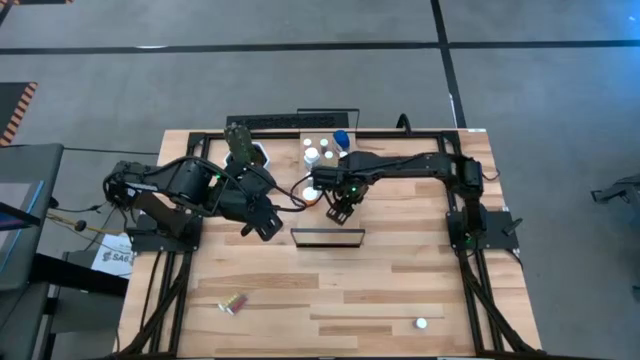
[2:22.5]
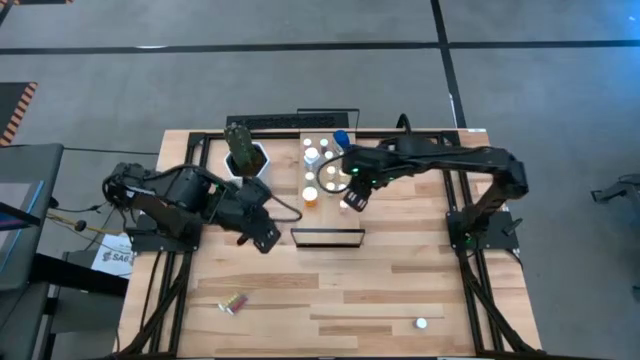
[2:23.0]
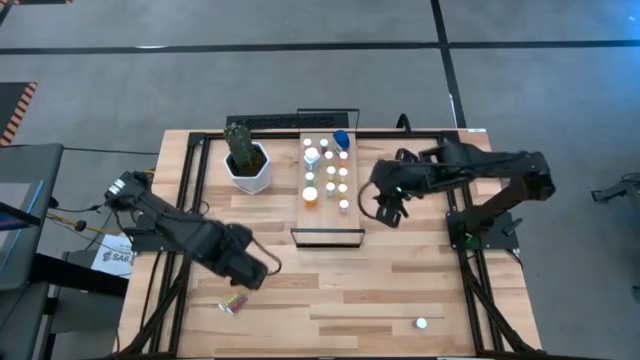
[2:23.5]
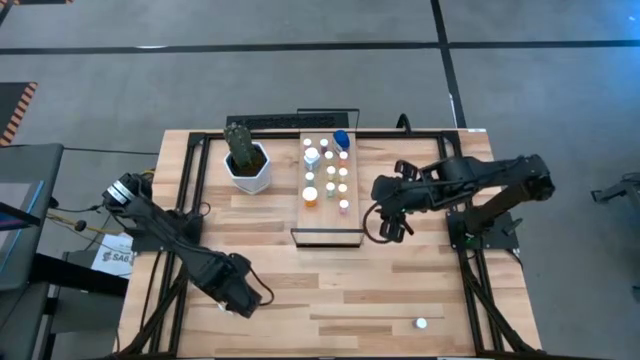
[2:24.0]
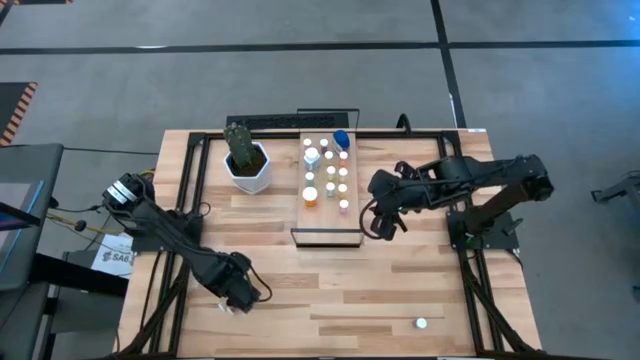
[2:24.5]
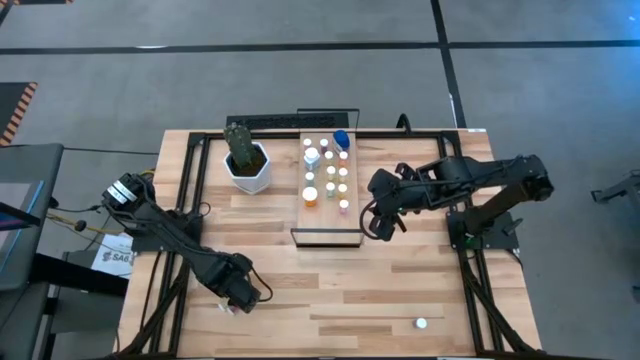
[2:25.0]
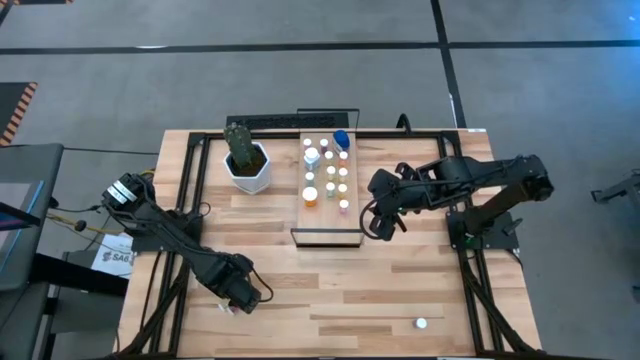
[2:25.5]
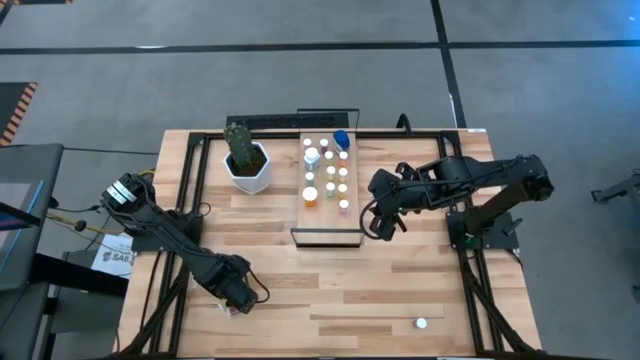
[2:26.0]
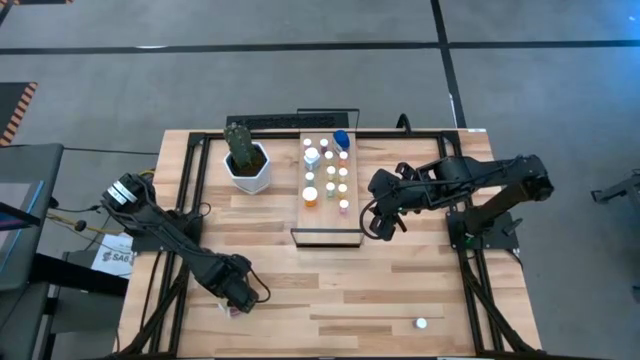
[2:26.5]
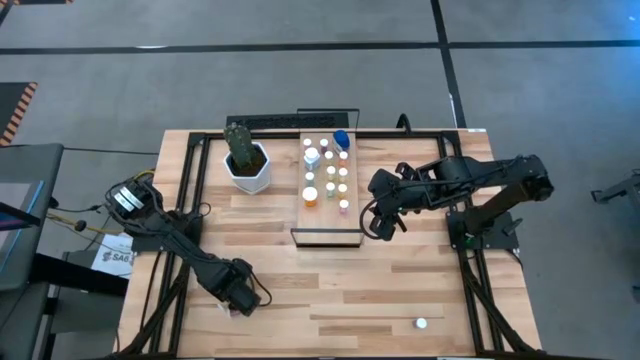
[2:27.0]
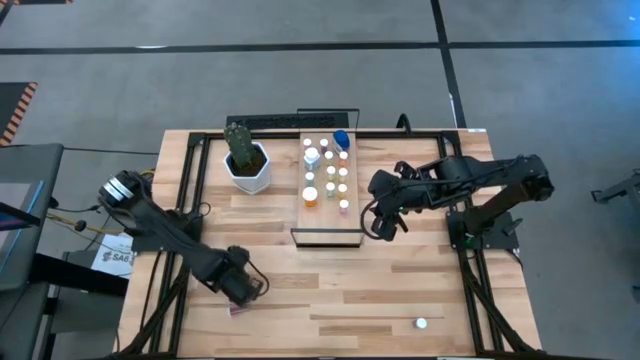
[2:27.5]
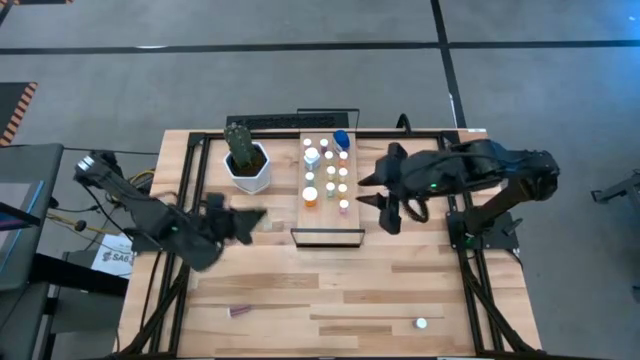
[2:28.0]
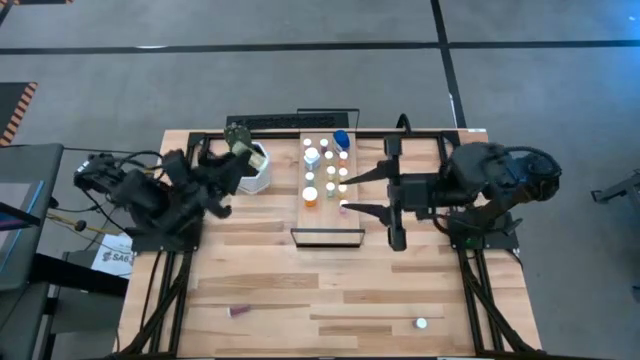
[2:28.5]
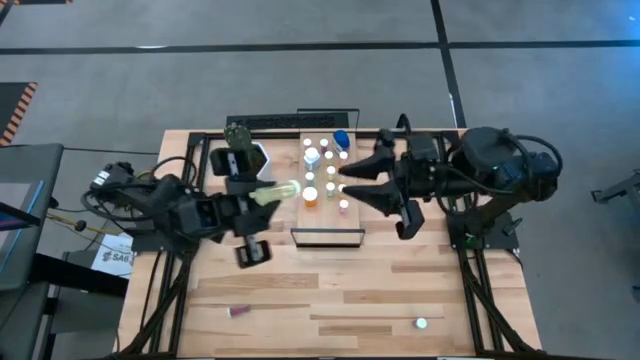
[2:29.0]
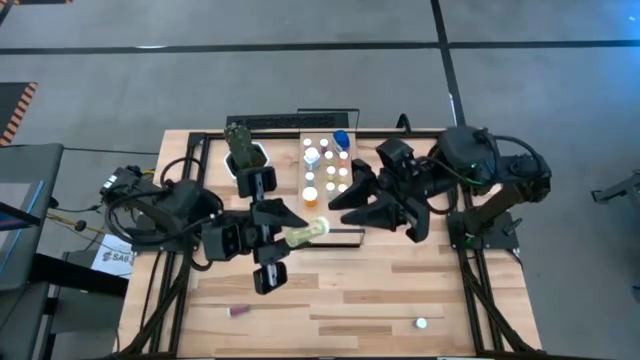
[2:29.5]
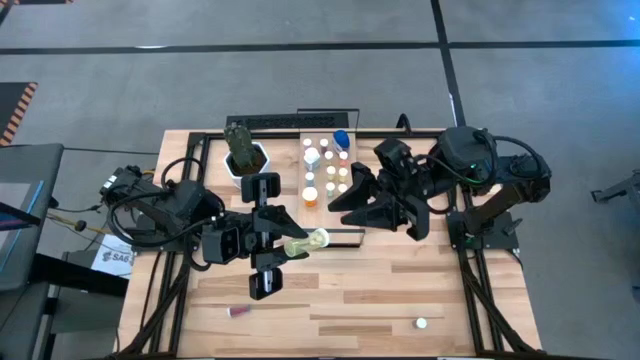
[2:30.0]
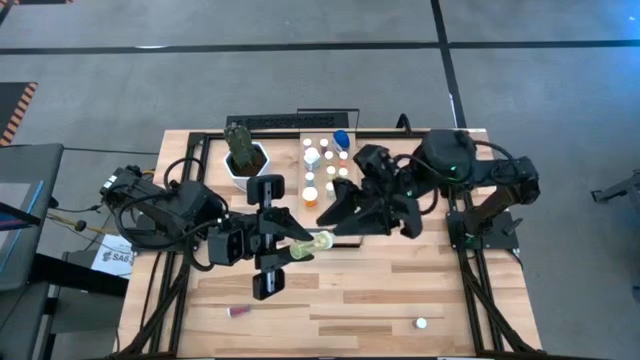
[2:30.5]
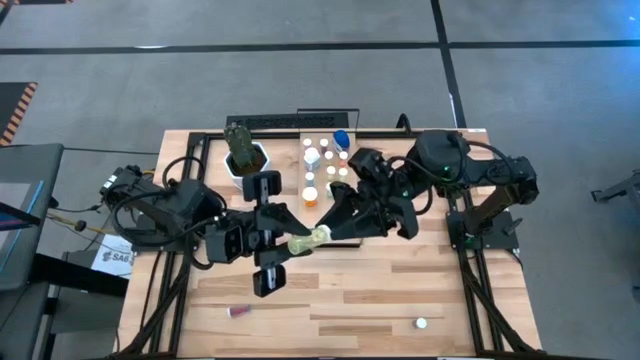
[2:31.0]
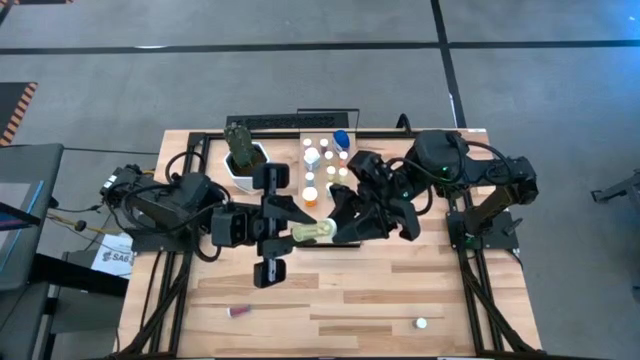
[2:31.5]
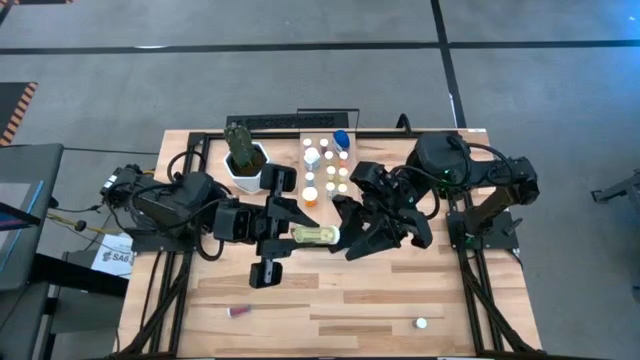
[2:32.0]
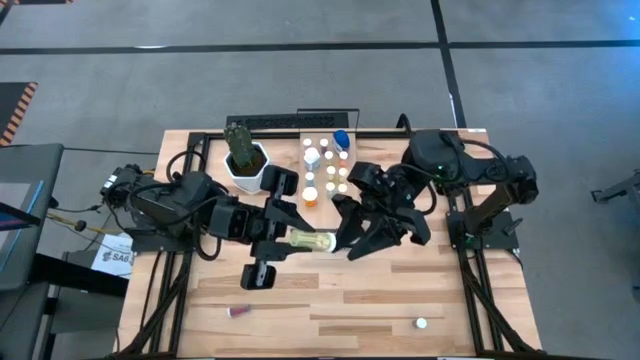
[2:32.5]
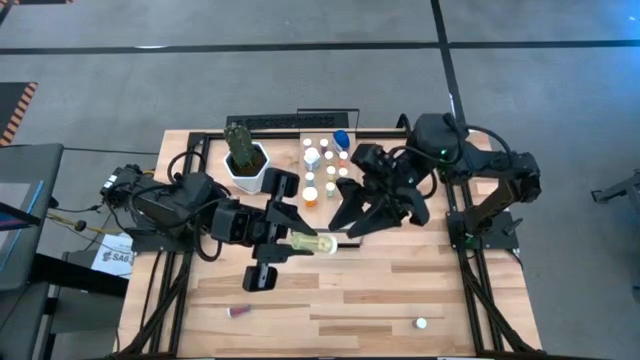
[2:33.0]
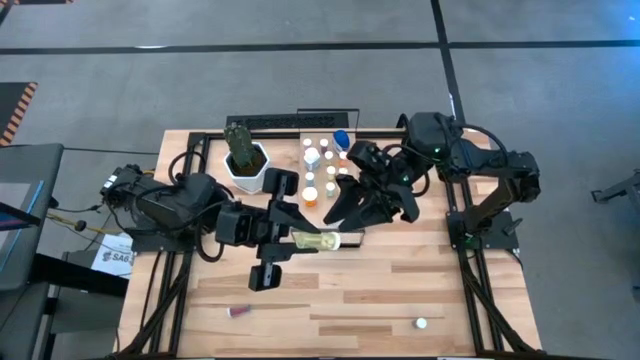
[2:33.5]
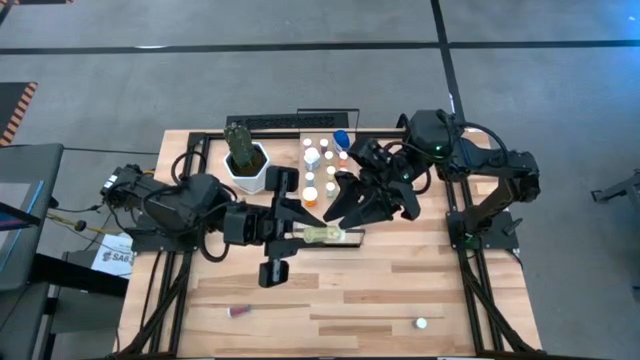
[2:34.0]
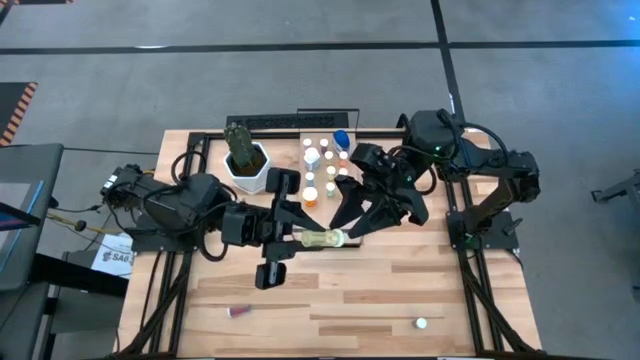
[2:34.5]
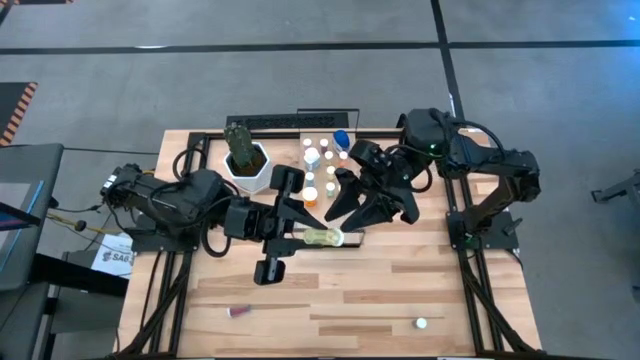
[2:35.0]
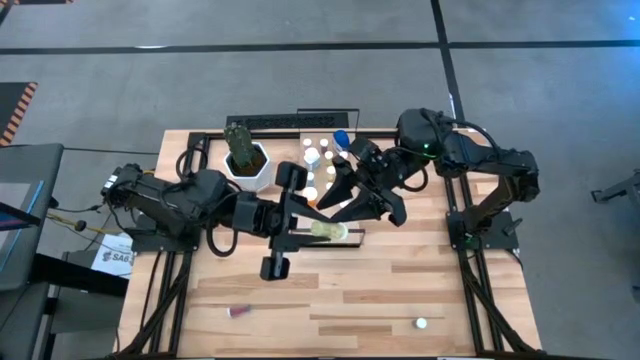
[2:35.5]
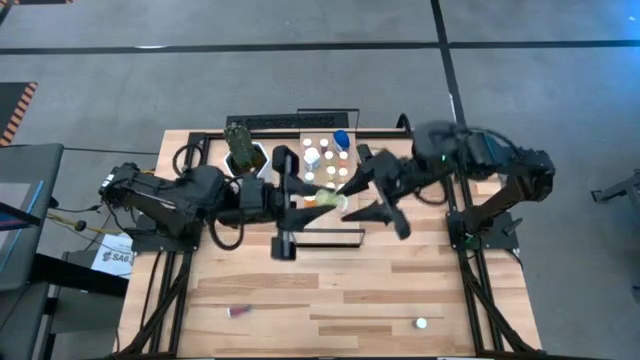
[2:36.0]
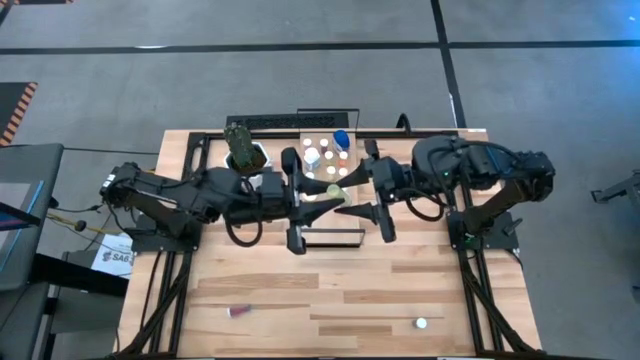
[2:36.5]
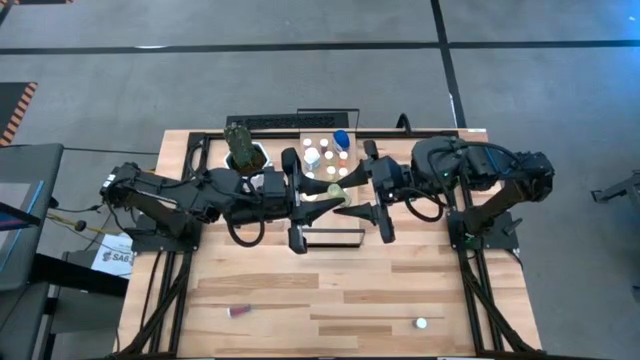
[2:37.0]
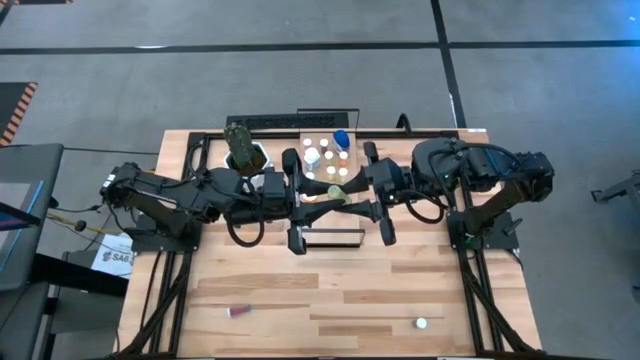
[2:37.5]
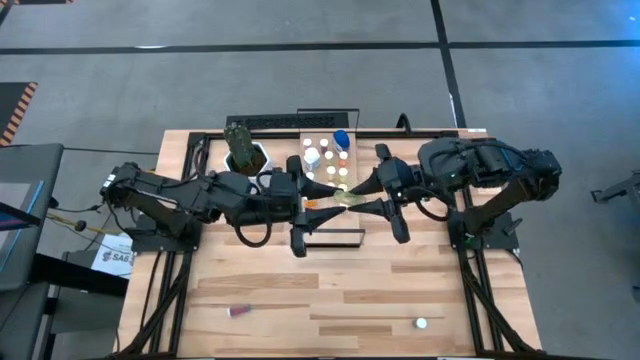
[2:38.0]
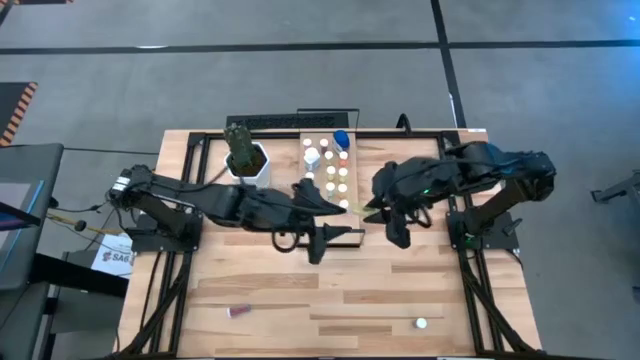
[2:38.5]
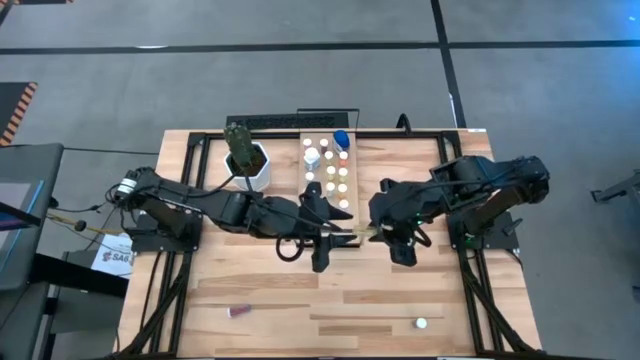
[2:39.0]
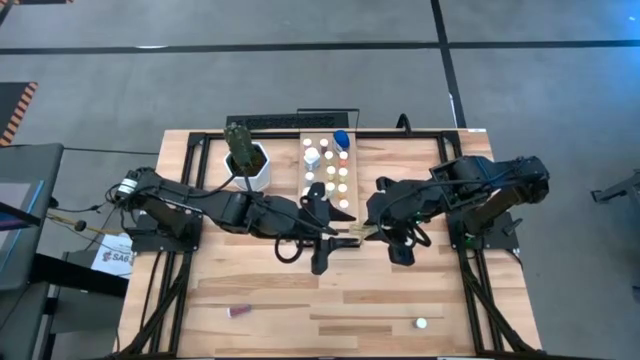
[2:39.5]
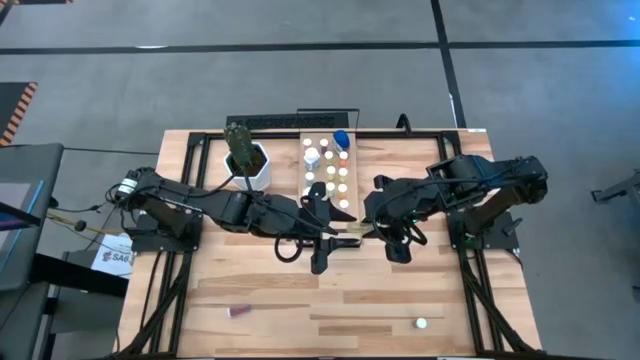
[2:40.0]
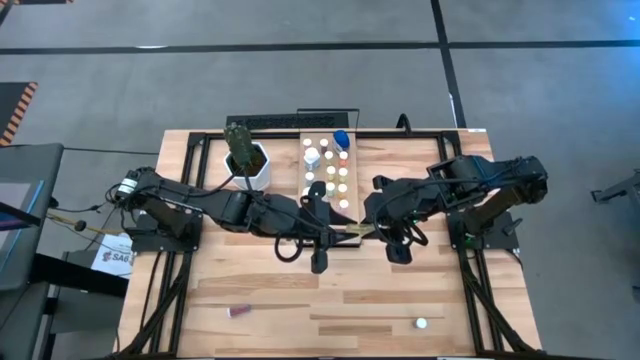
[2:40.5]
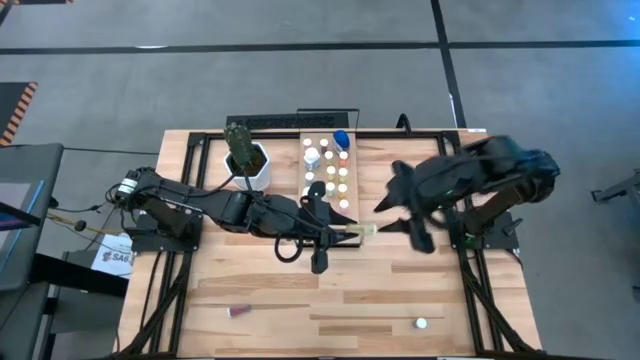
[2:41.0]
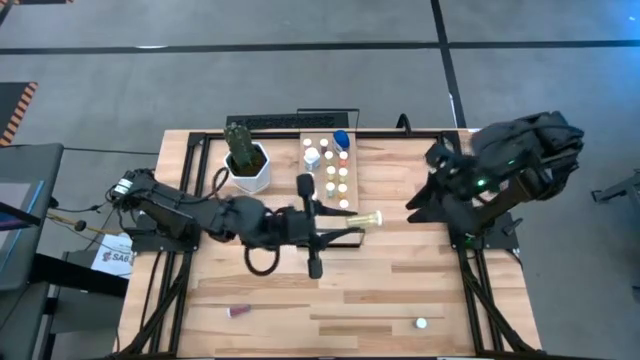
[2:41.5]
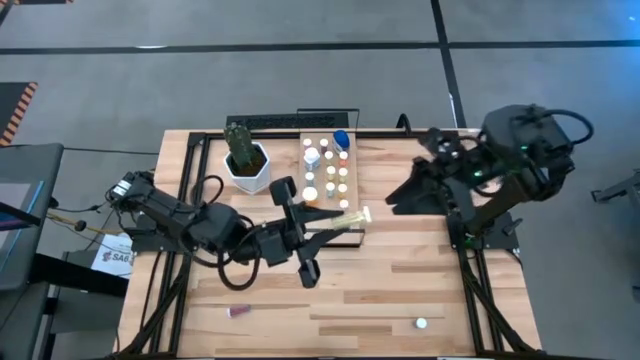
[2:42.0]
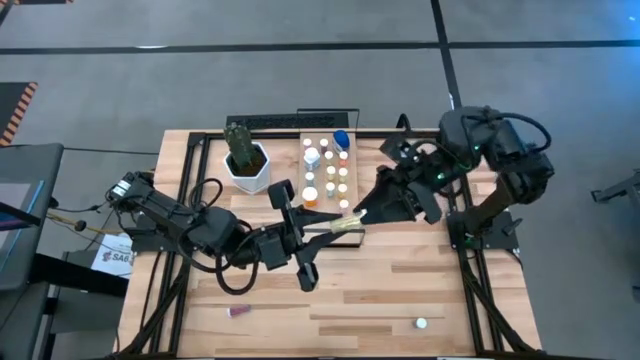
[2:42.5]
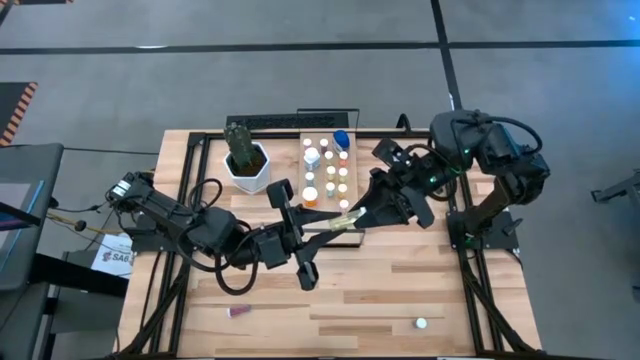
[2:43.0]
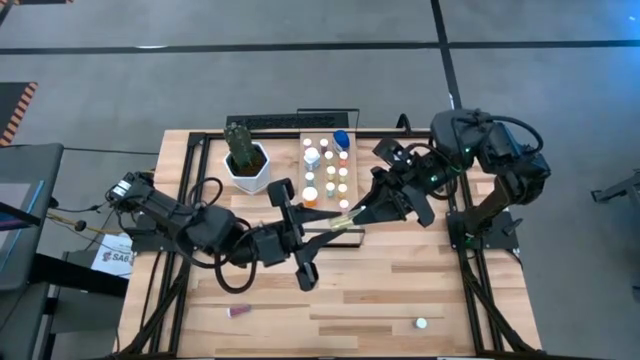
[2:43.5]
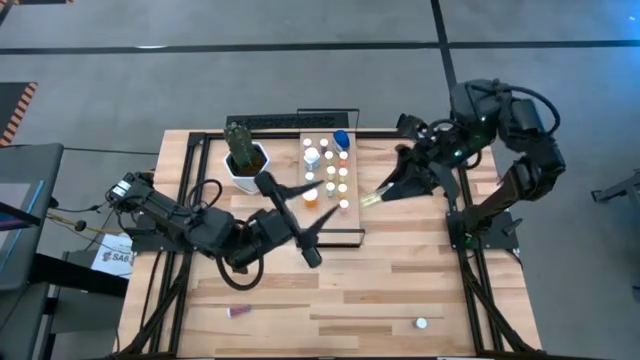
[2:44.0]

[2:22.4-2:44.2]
Task: Pick and place medicine bottles onto shelf by color
Put the yellow pill bottle on the shelf

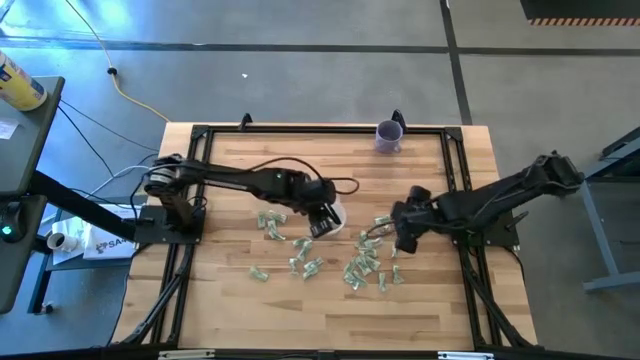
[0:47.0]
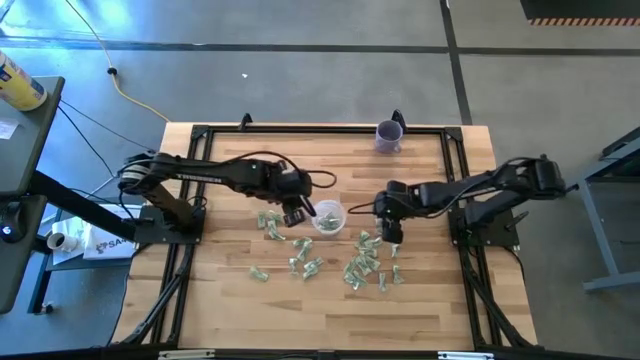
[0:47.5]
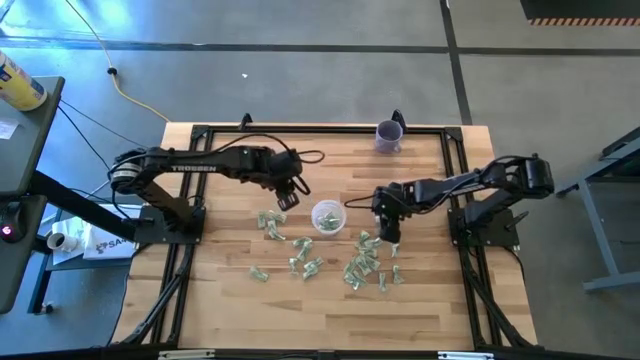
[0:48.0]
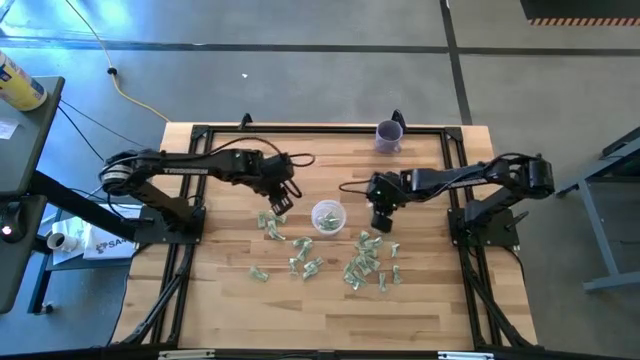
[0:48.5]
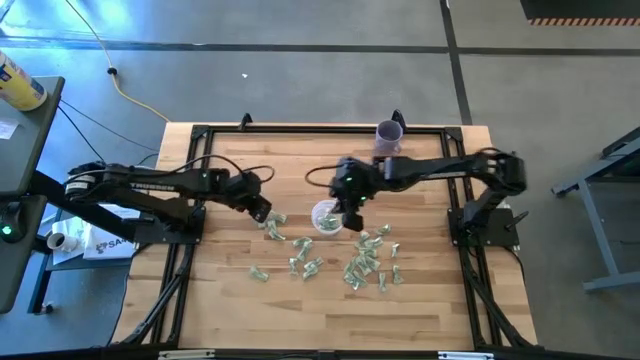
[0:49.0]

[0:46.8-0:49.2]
Task: Pick and place Stevia / Truvia into bins
Put the green stevia packet into the transparent bin
